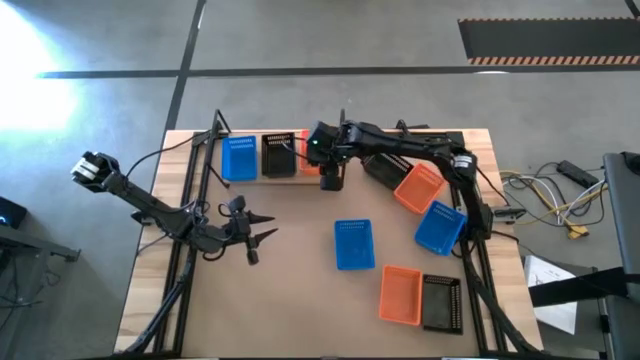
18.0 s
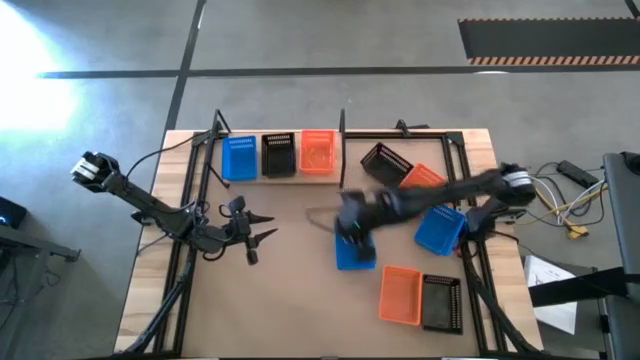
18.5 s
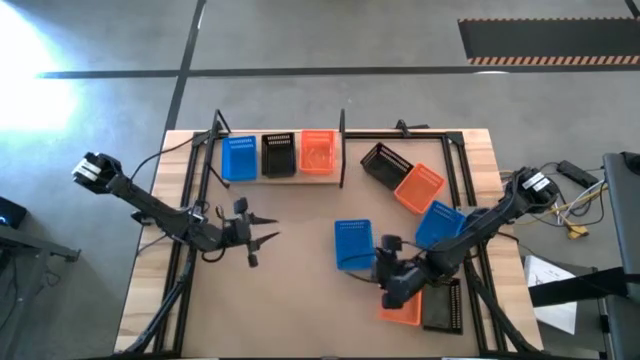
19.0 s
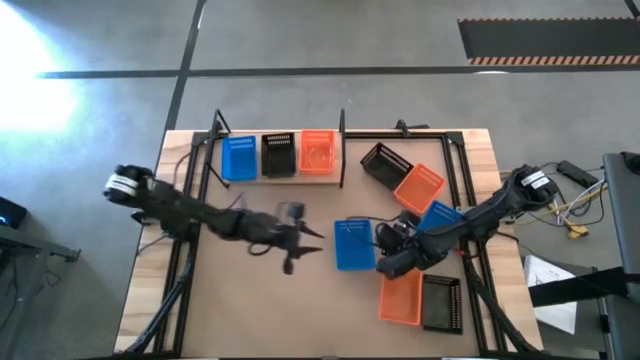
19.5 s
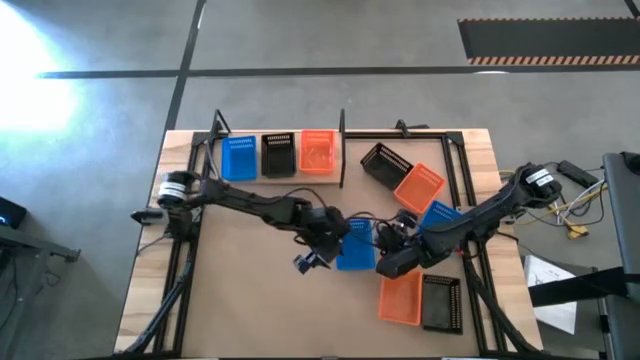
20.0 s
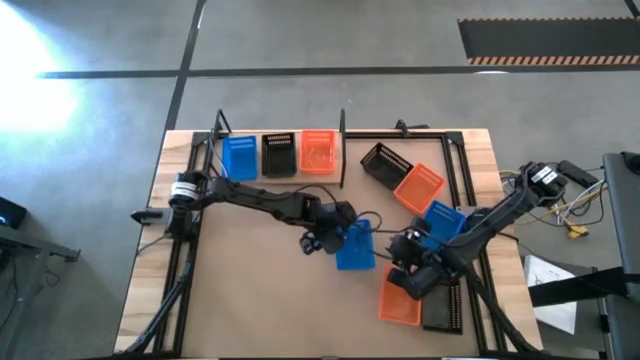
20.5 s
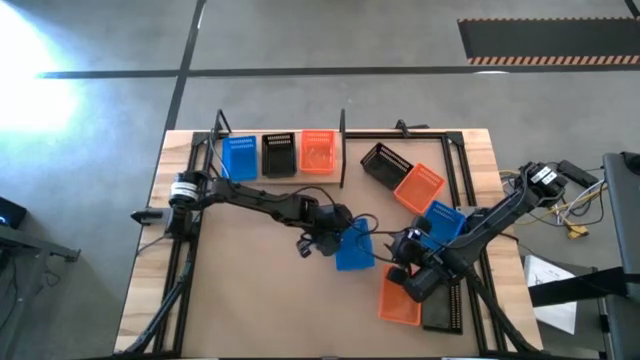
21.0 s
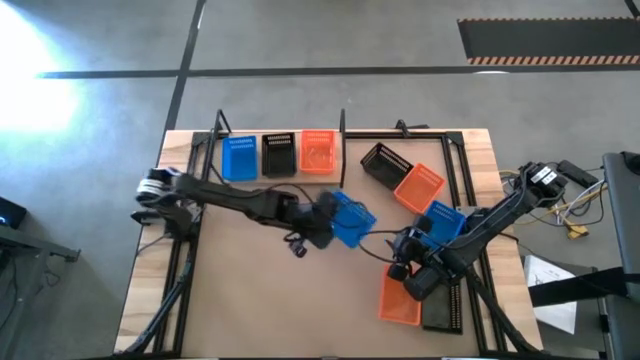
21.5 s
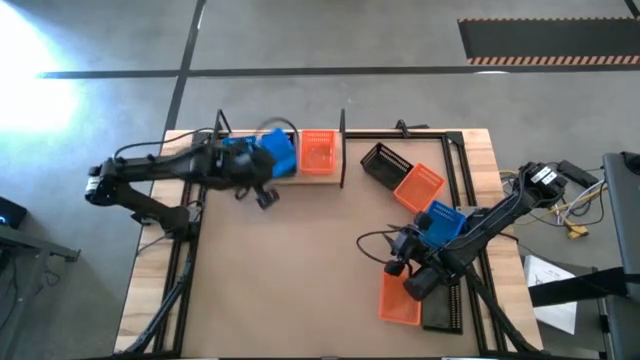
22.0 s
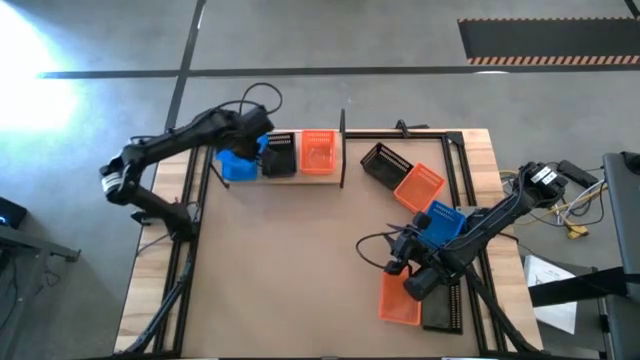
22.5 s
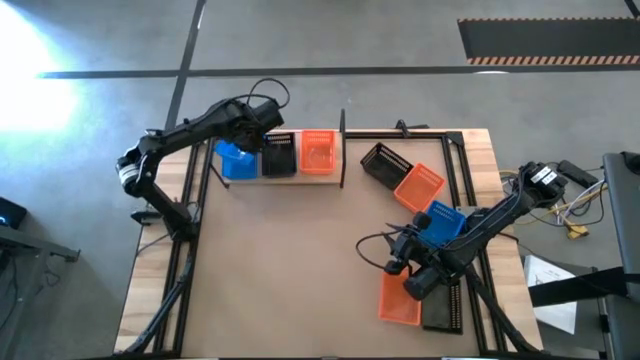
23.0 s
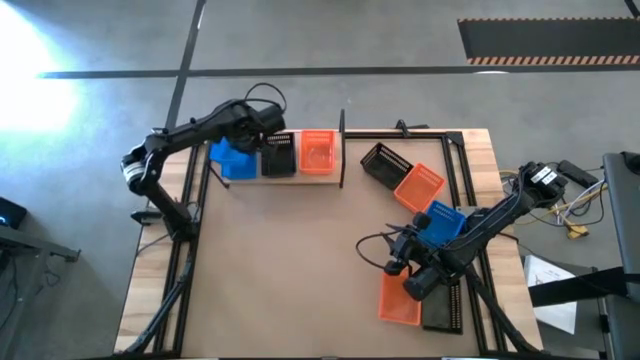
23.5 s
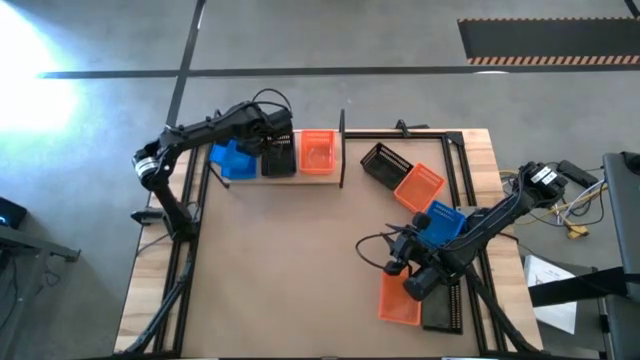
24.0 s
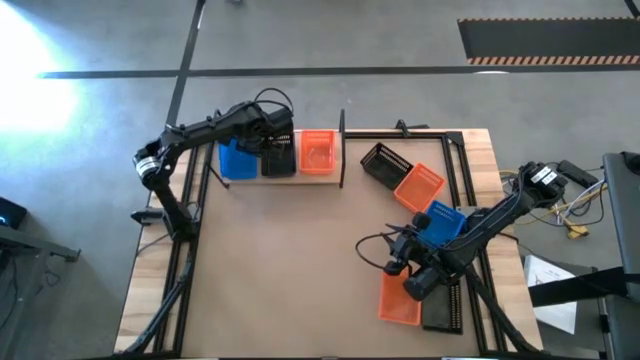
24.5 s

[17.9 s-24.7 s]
Task: Stack baskets on shelf by color
Stack the left blue basket on top of the other blue basket on the shelf

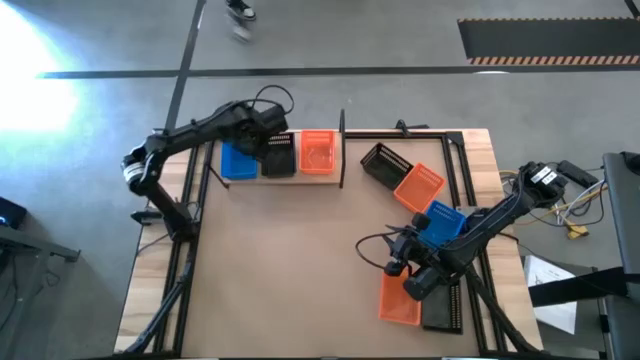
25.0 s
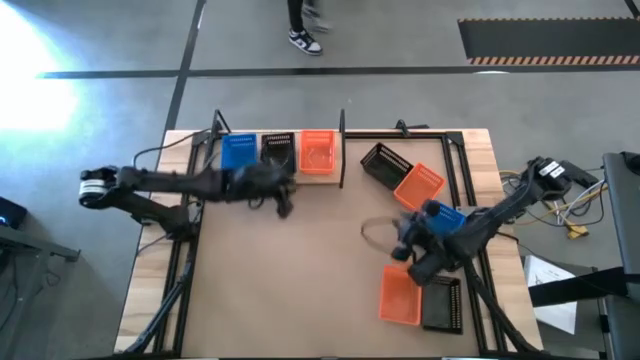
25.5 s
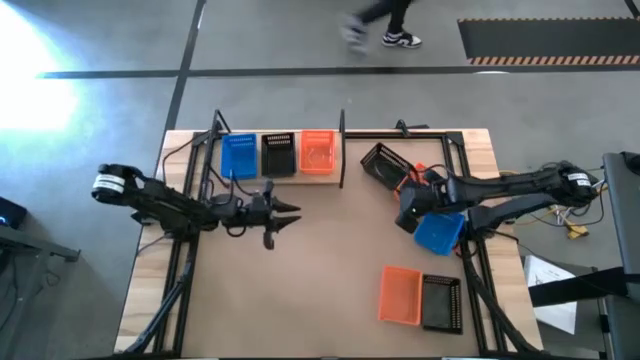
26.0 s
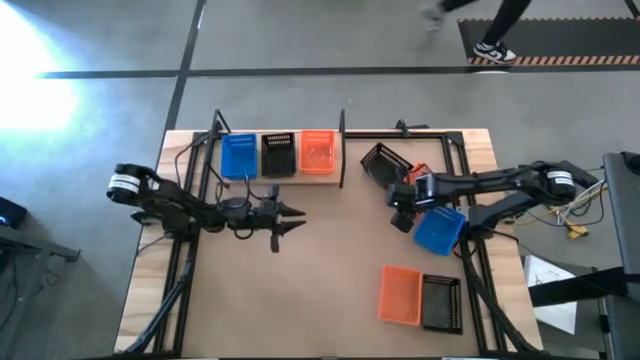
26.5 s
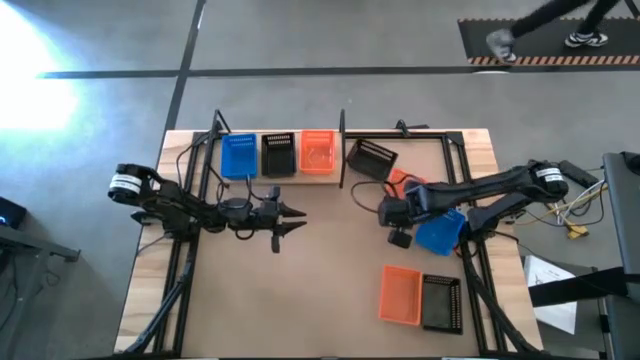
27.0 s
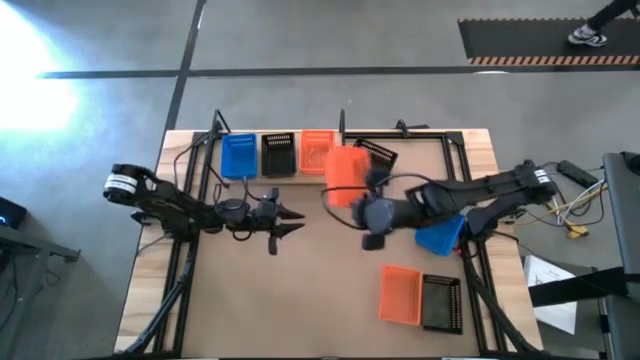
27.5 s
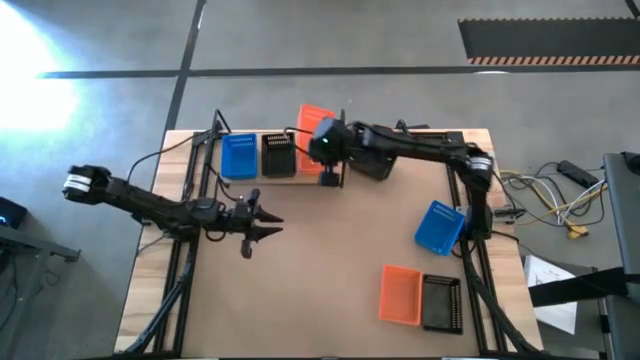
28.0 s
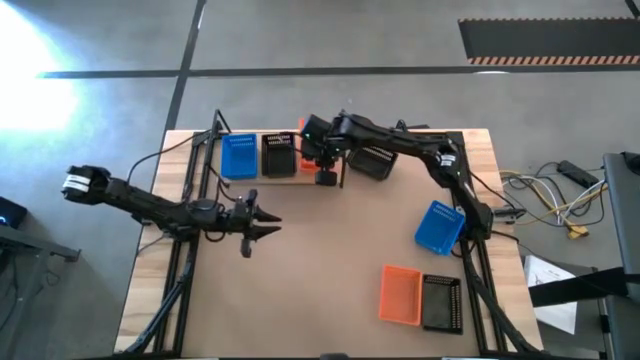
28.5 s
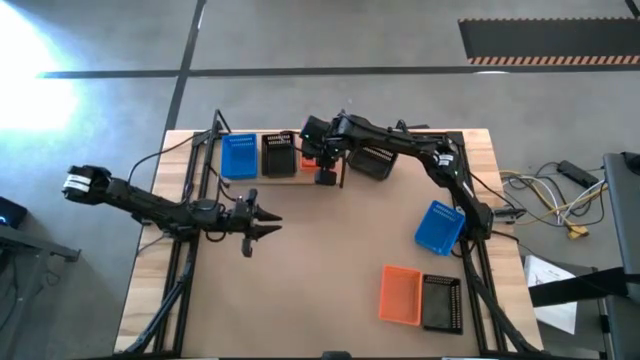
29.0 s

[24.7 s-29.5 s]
Stack the top orange basket on top of the other orange basket on the shelf

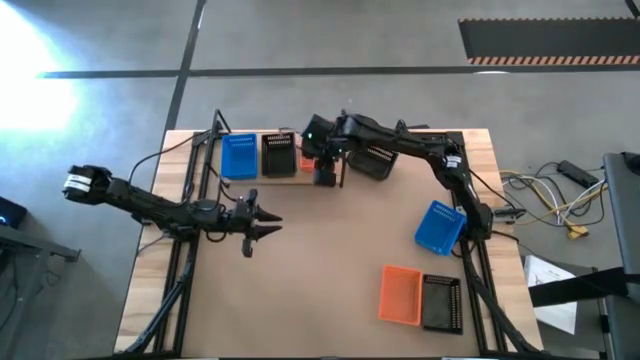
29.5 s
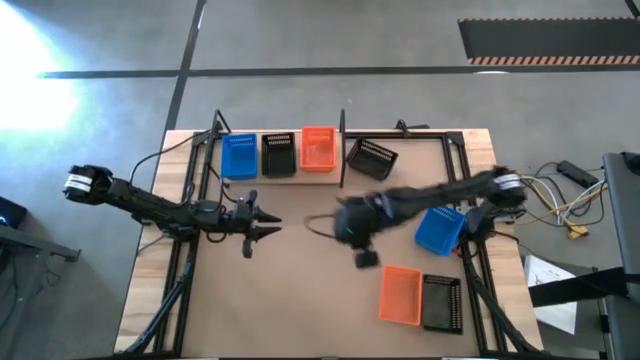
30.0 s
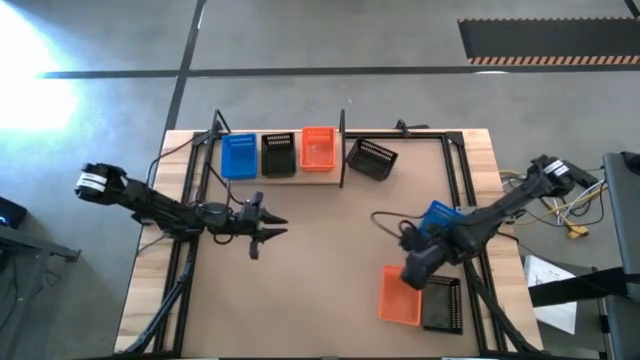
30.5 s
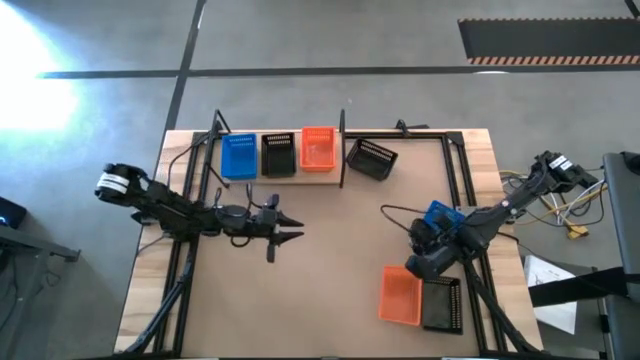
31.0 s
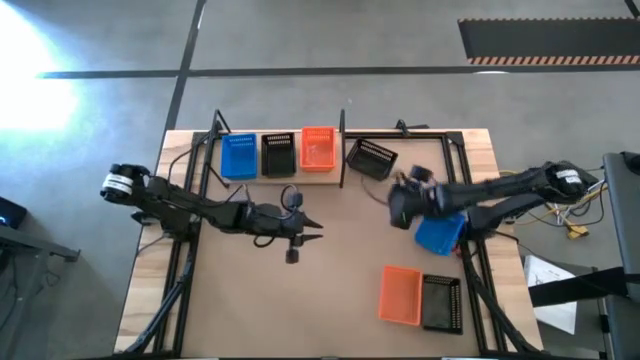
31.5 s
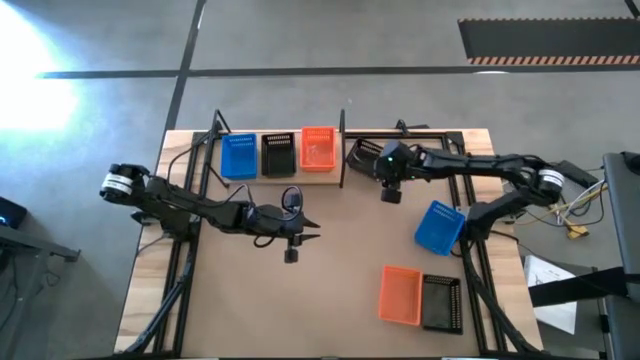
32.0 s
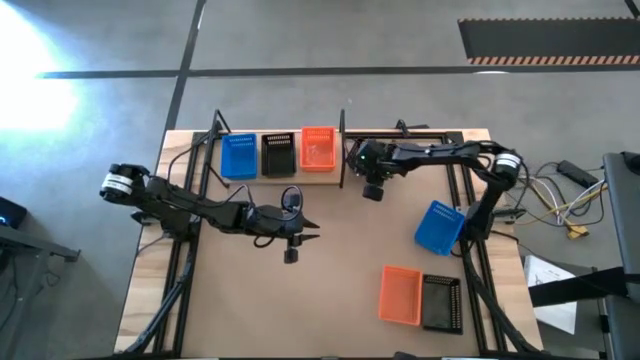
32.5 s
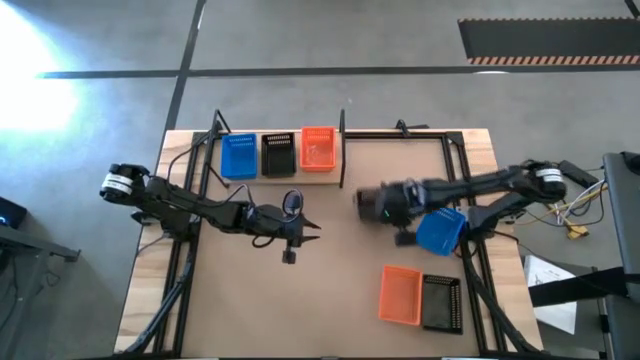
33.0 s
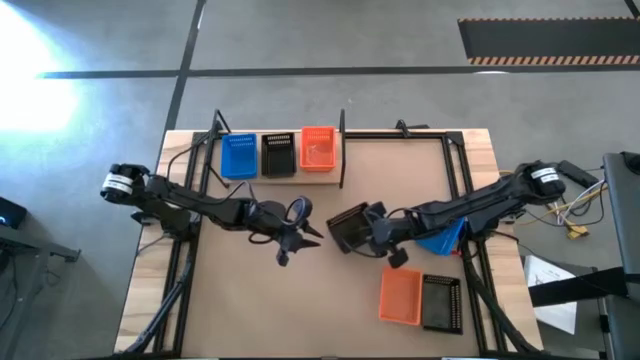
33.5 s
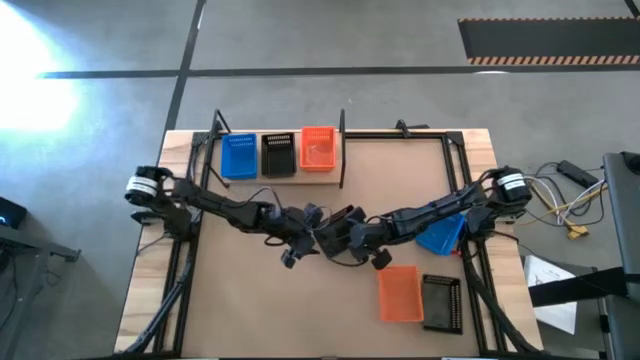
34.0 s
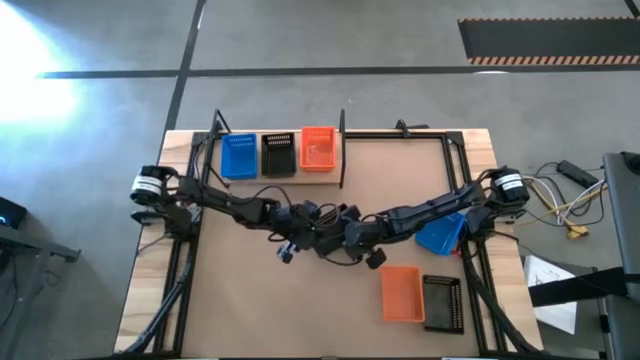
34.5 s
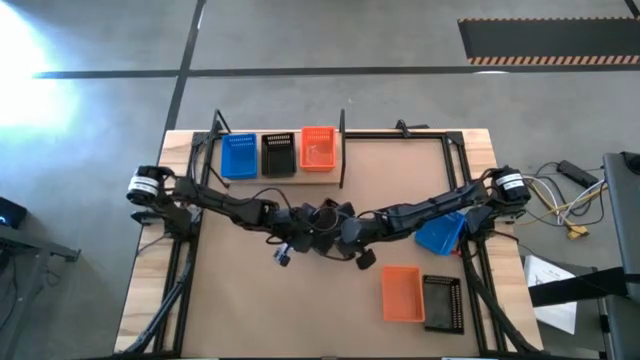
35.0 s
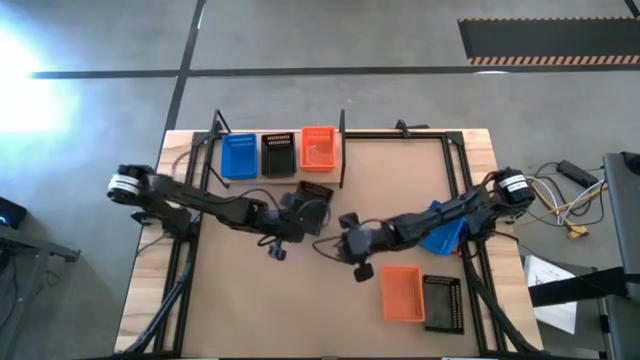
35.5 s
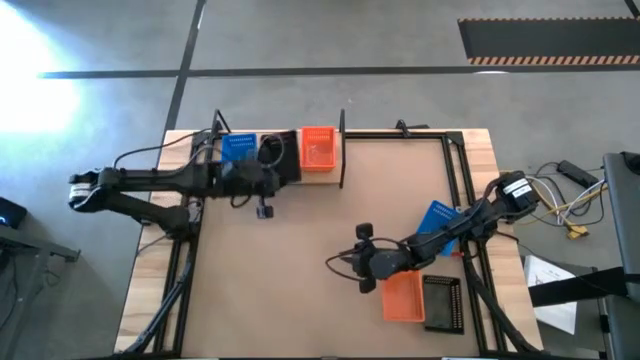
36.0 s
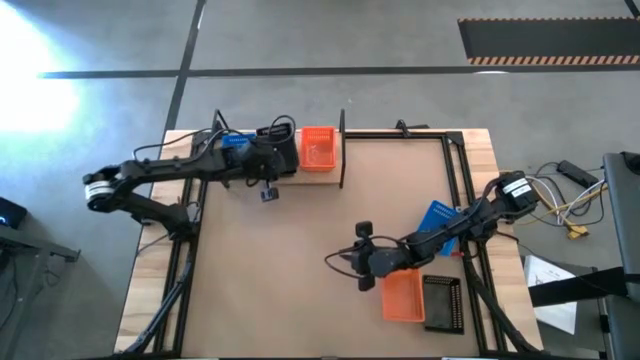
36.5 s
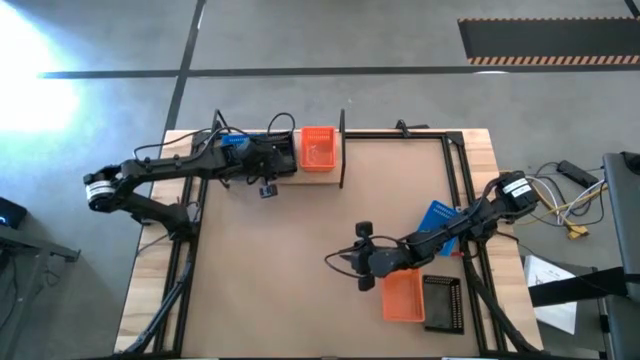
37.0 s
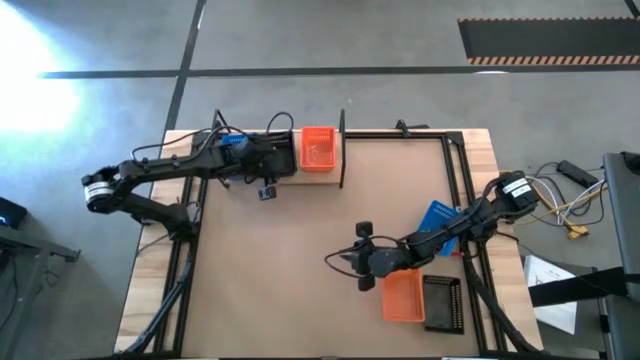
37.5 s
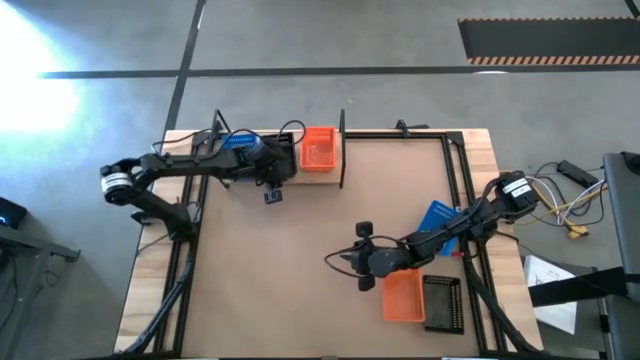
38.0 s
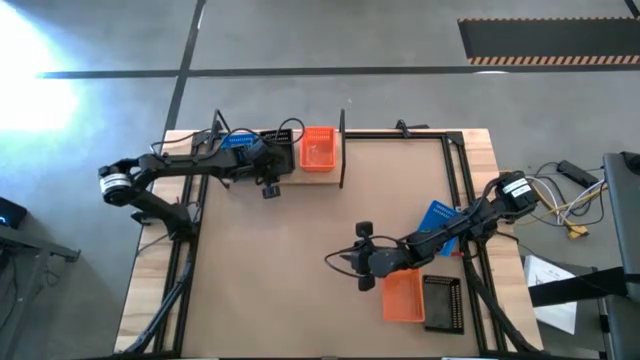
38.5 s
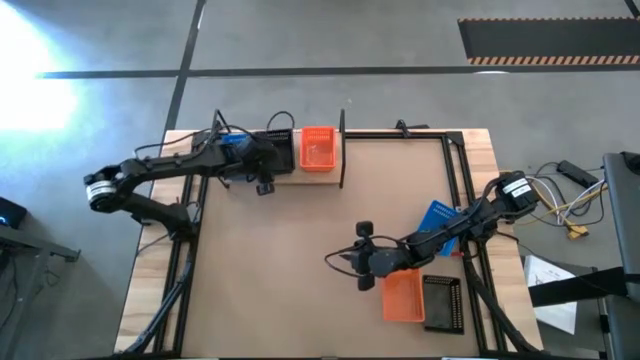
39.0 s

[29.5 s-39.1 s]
Stack the top black basket on top of the other black basket on the shelf
